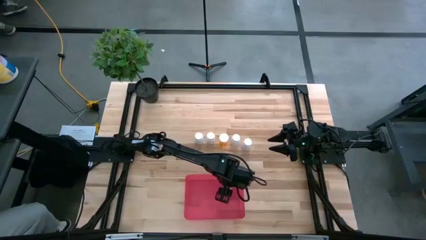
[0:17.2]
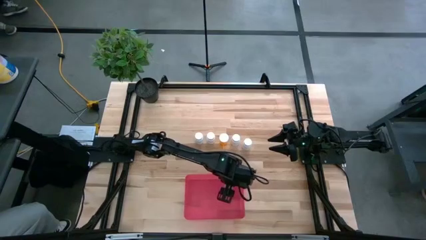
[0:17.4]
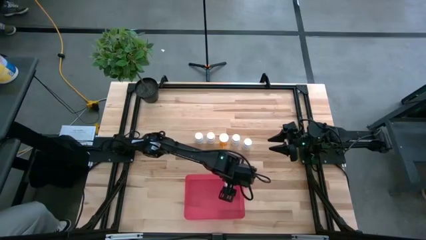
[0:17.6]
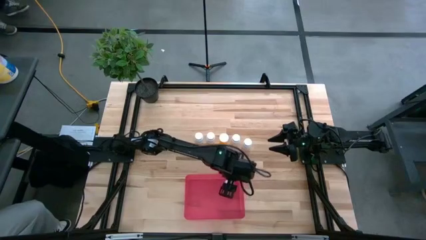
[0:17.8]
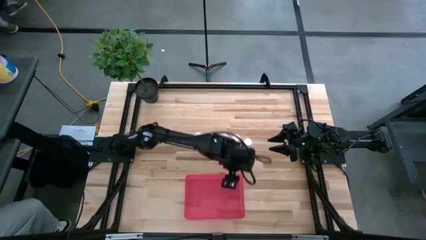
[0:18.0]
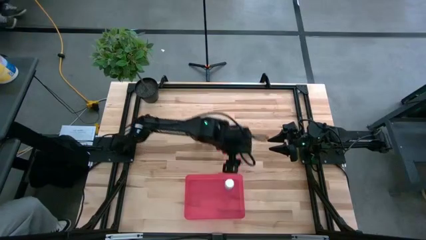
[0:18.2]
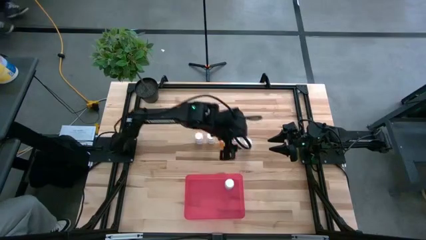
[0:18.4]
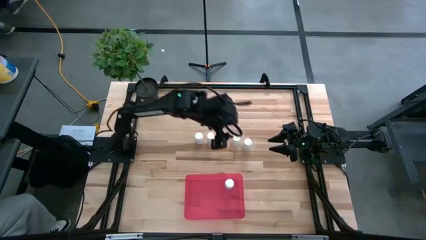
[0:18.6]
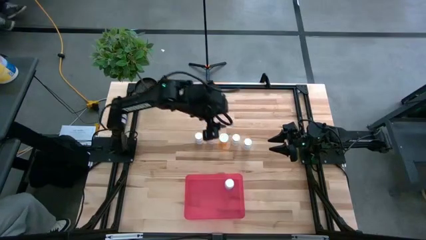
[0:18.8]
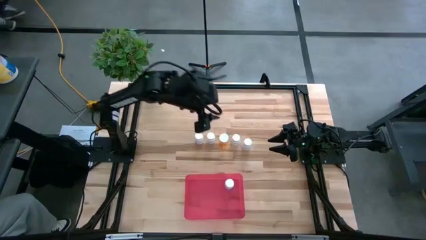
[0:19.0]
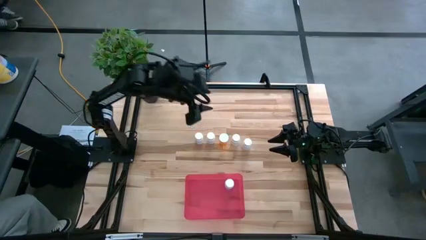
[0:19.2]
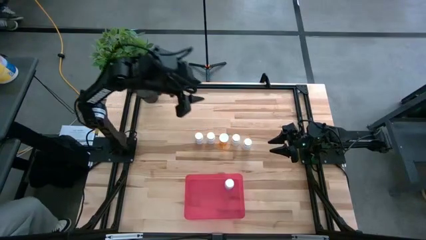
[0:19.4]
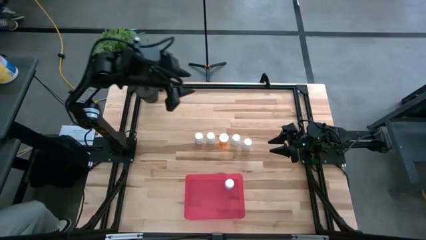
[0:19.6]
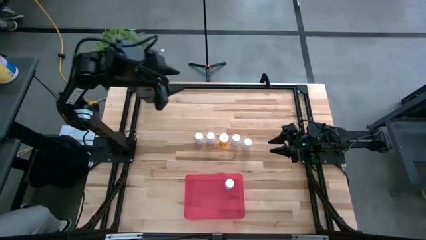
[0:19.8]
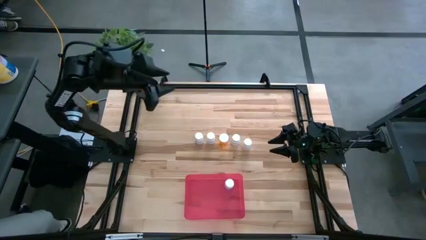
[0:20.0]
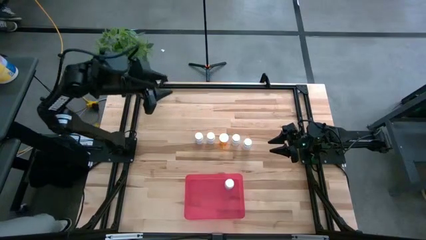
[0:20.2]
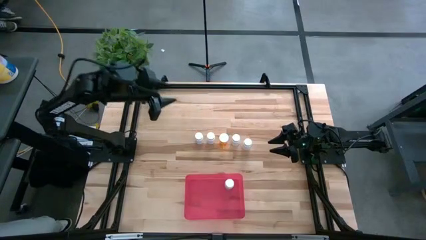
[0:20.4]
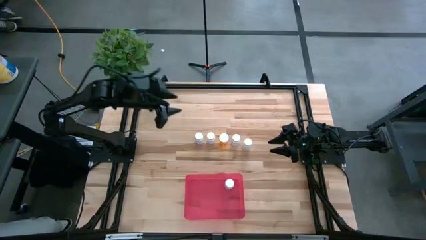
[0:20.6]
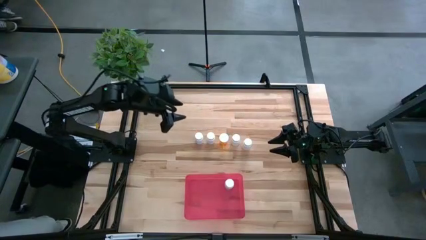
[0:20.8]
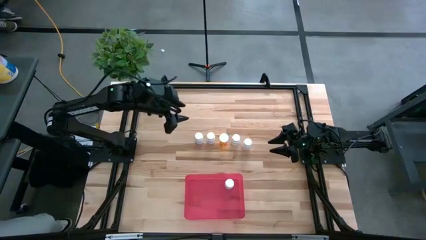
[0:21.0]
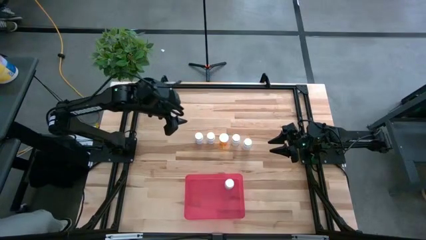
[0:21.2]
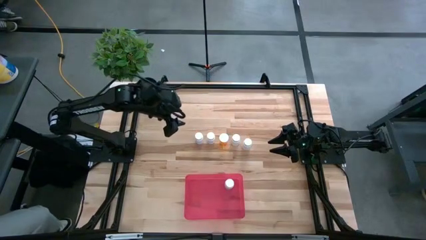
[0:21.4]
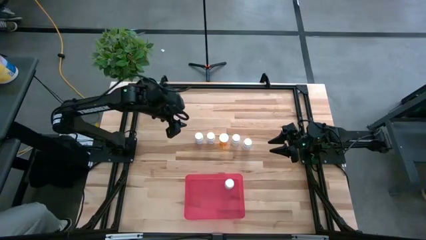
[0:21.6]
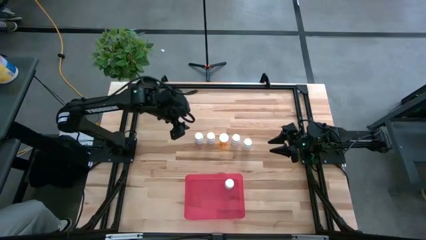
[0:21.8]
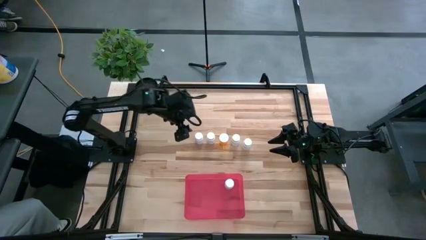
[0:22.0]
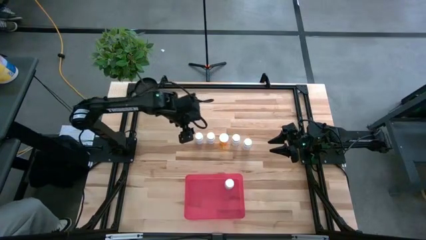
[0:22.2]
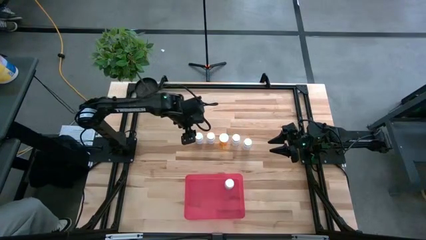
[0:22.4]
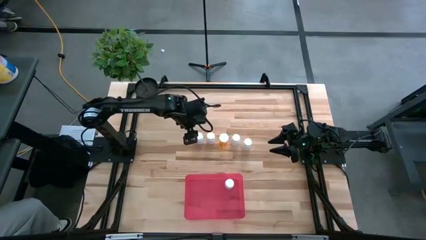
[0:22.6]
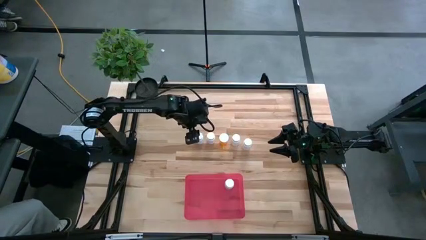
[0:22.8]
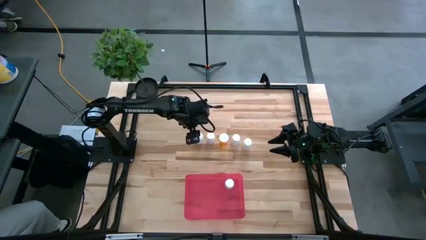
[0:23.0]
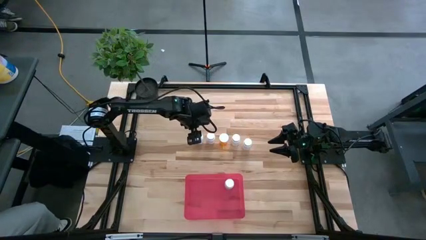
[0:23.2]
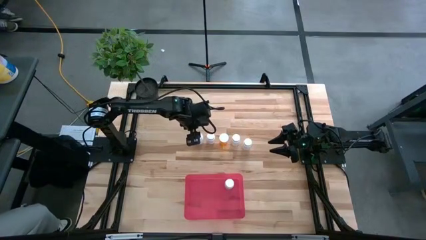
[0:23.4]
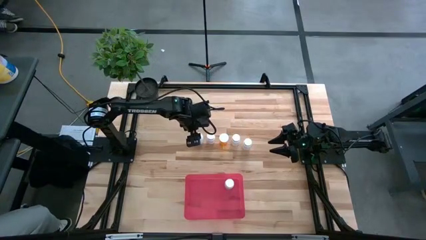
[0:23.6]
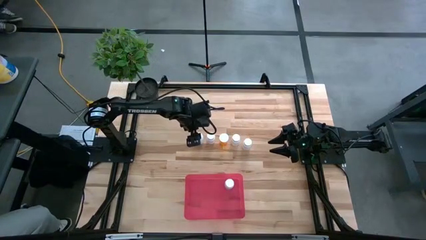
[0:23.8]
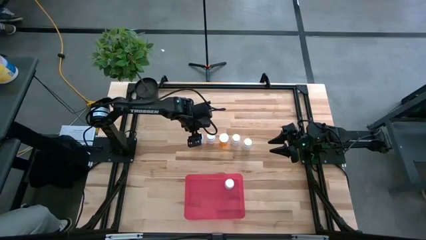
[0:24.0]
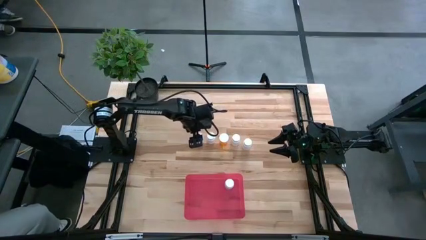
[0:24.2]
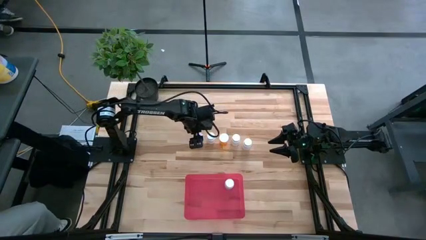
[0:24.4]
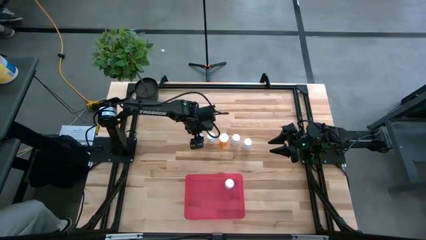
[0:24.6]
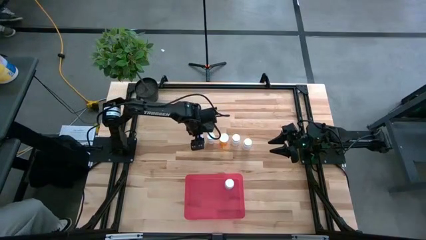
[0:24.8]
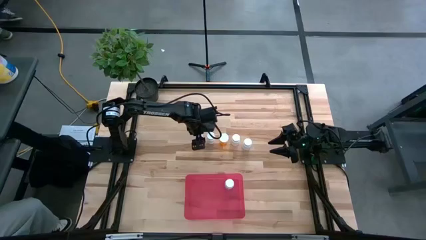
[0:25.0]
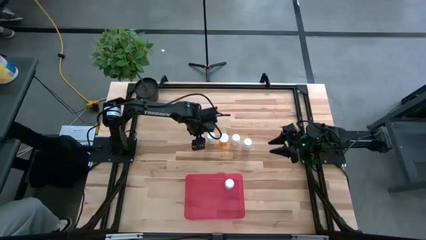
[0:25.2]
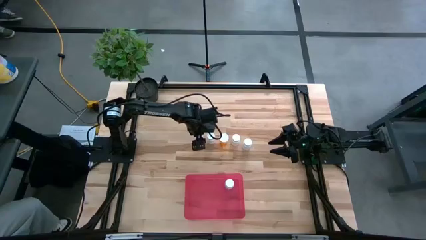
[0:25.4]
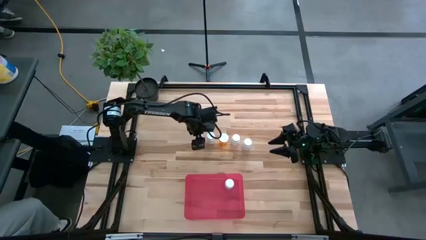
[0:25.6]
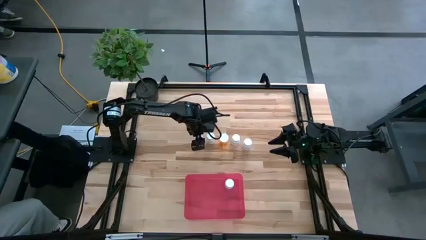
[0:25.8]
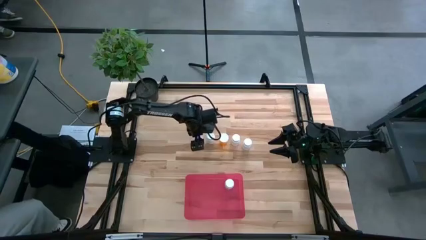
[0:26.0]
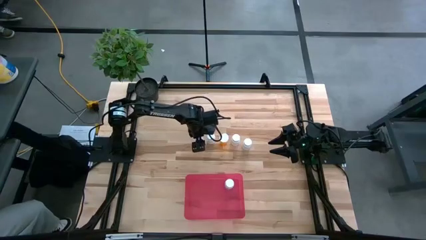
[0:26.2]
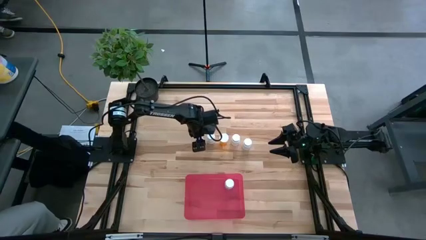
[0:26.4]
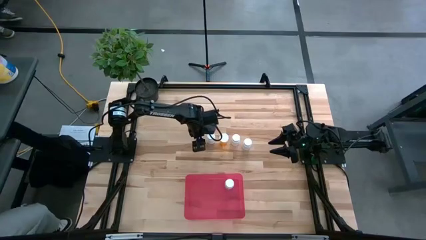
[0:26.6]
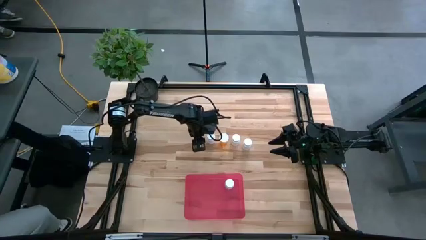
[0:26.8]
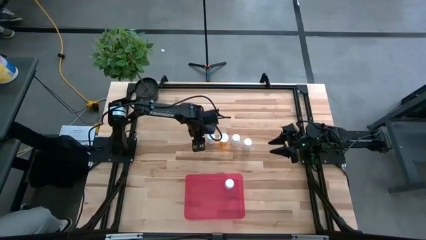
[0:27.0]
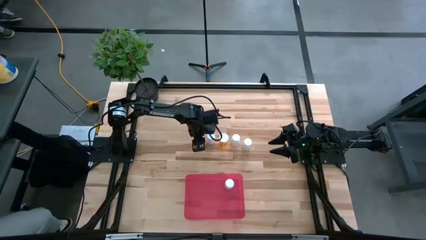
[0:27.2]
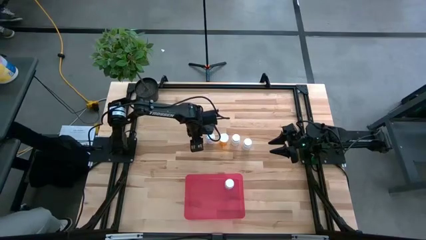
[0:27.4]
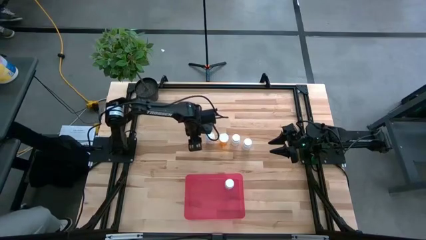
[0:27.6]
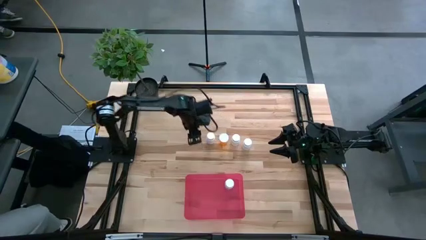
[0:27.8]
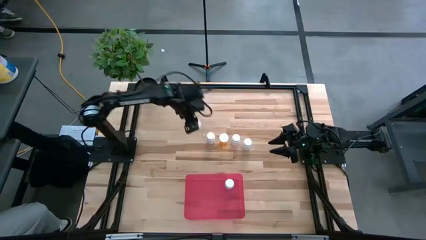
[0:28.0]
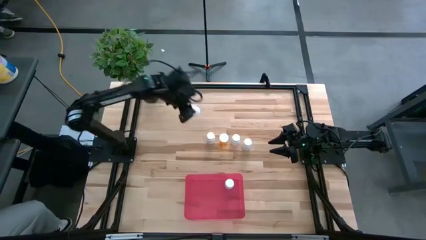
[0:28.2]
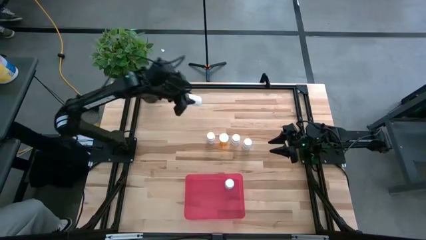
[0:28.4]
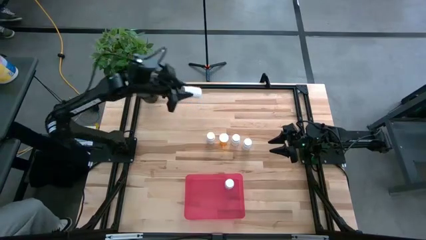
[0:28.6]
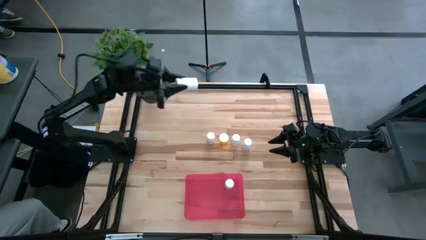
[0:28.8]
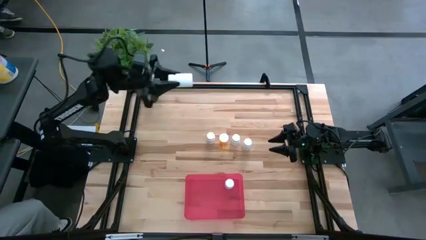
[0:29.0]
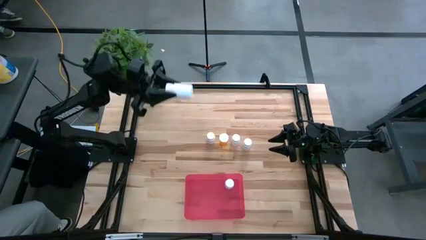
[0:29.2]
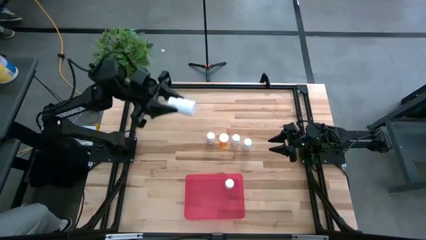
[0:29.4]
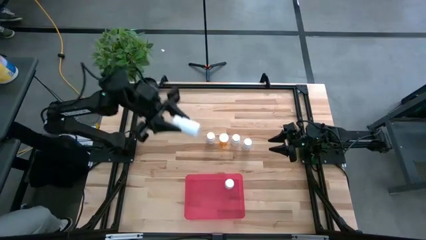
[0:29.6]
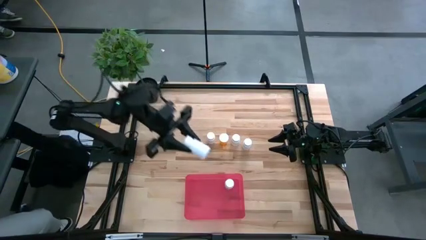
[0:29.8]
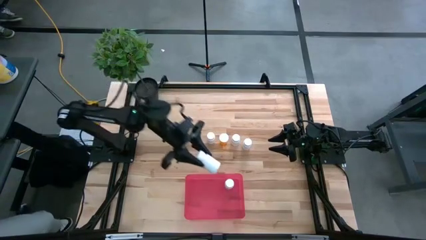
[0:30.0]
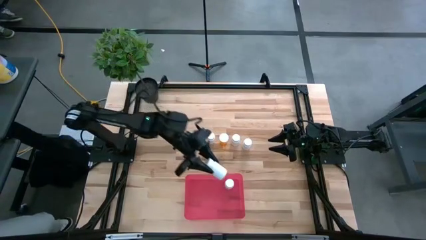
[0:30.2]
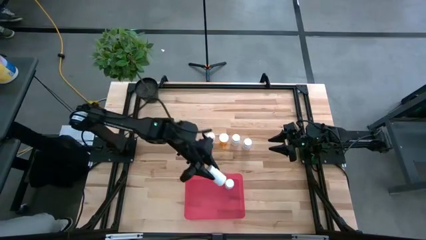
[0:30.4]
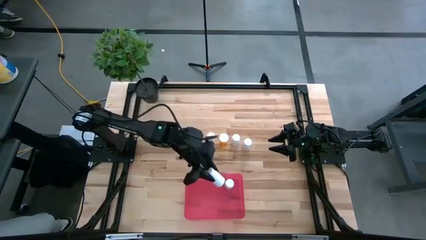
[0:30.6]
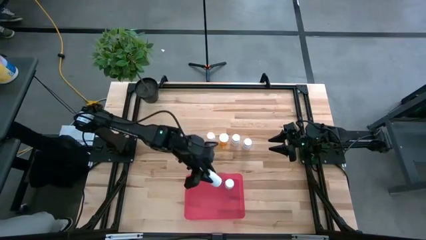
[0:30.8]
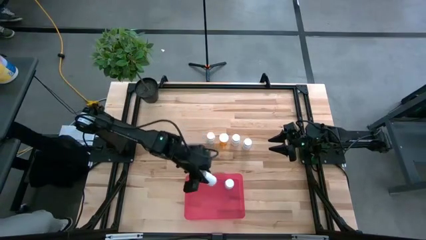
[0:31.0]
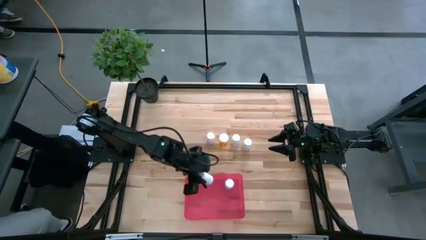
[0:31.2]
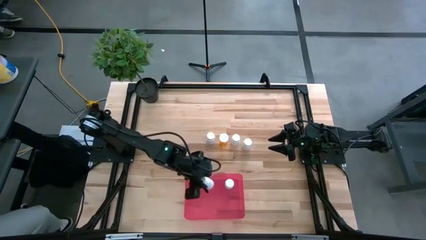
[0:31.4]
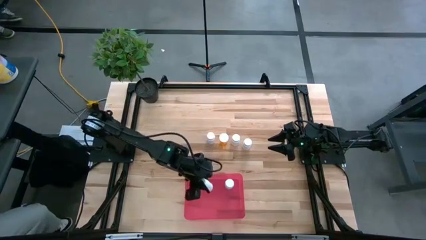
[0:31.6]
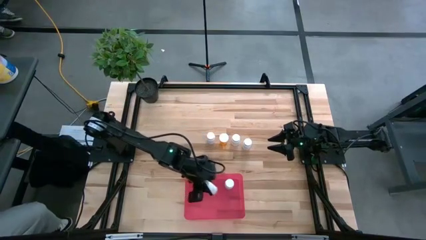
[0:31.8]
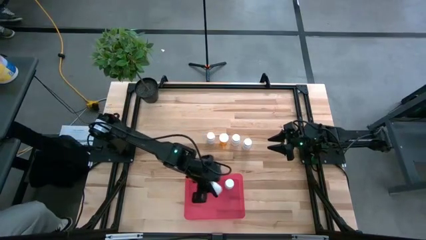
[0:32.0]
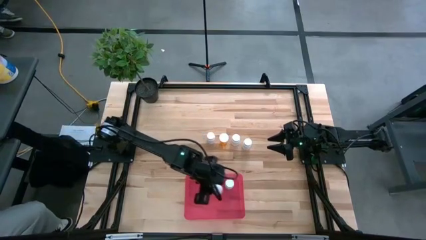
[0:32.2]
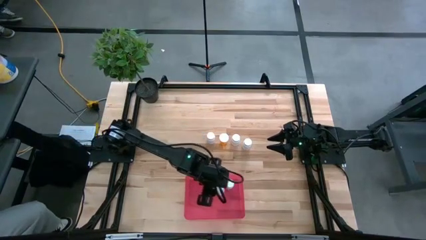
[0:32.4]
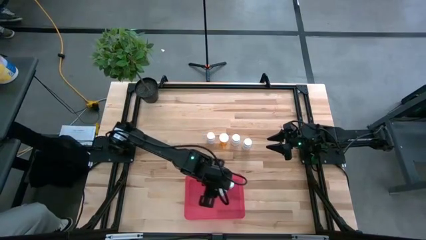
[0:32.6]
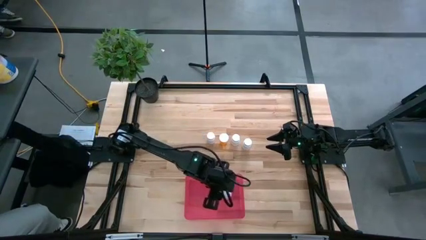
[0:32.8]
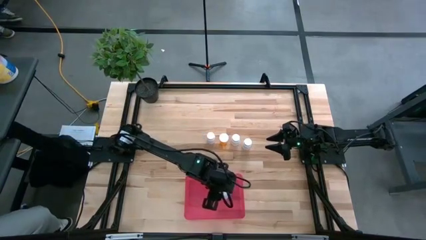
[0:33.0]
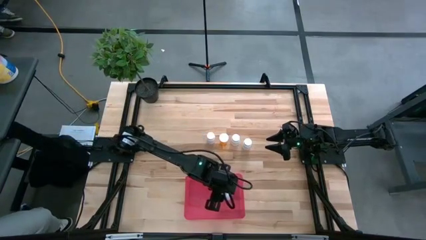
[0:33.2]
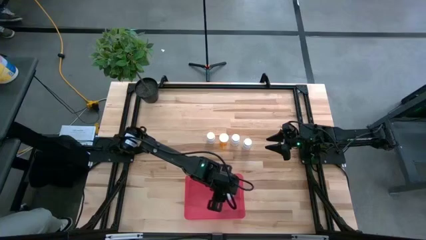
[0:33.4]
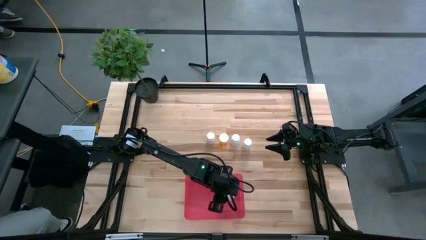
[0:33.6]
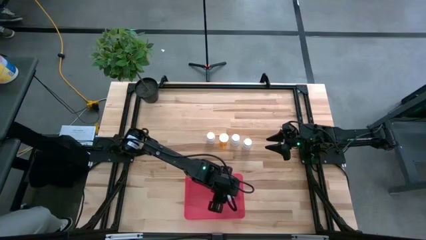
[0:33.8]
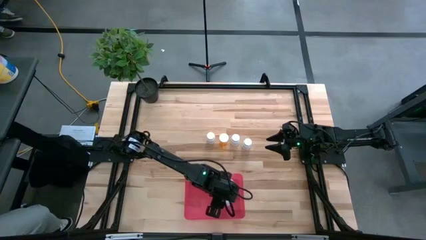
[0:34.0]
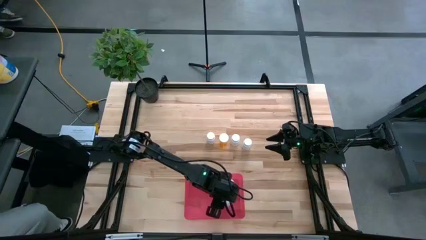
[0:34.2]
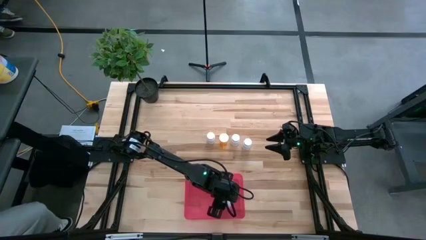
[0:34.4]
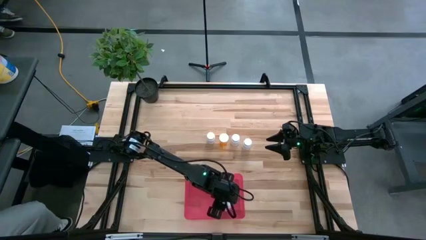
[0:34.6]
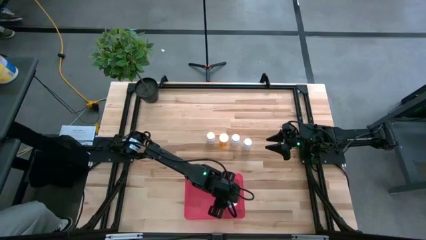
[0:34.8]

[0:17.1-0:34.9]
Task: Pick and place pill bottles into a basket
Put the white pill bottle into the red bin
